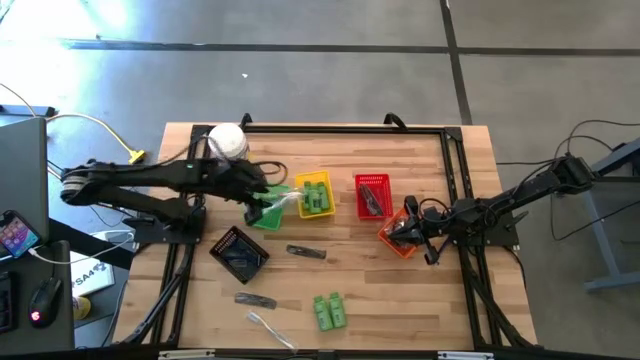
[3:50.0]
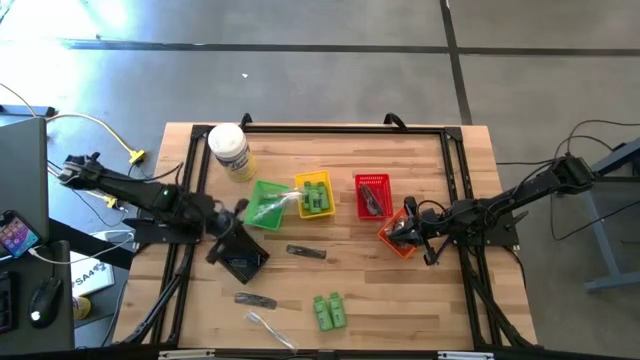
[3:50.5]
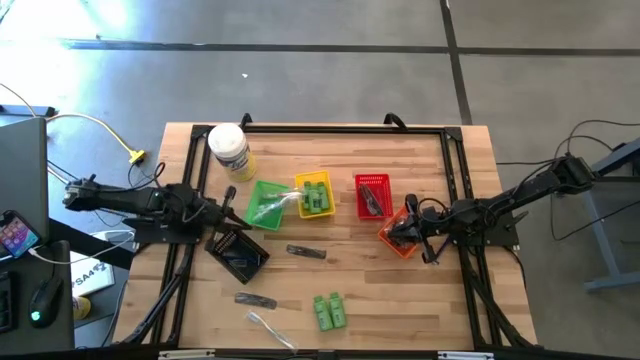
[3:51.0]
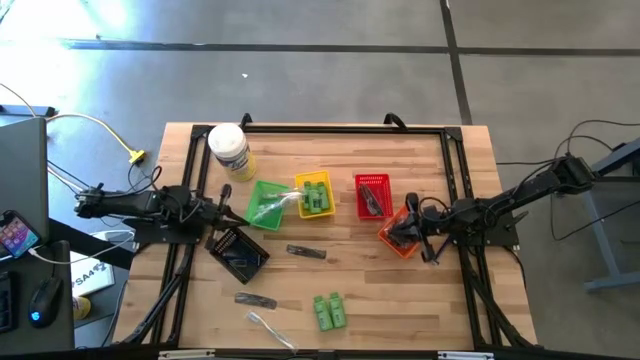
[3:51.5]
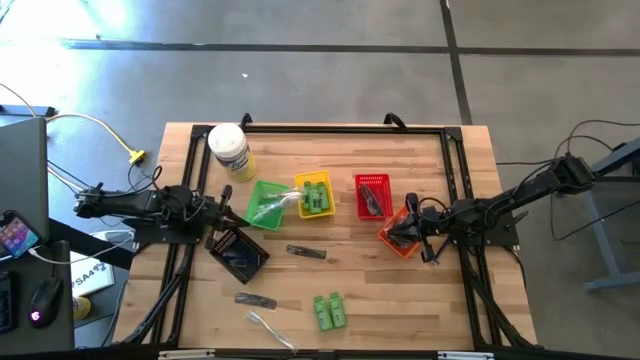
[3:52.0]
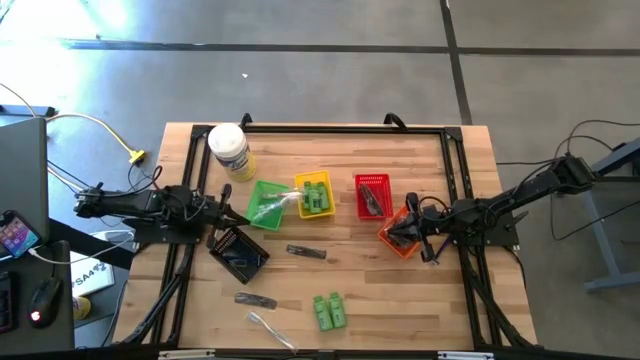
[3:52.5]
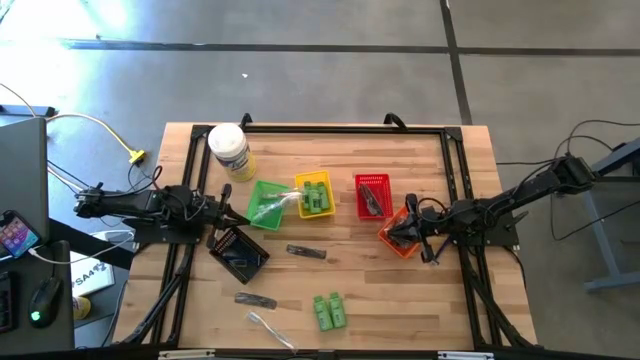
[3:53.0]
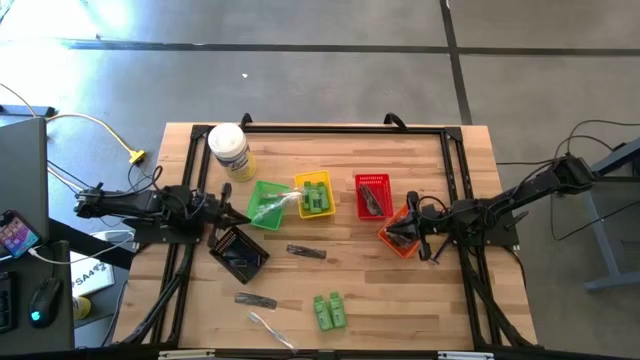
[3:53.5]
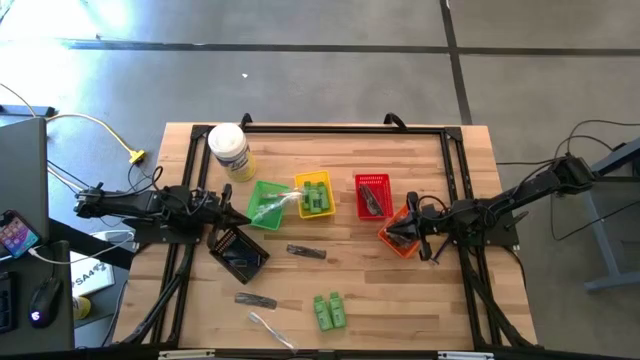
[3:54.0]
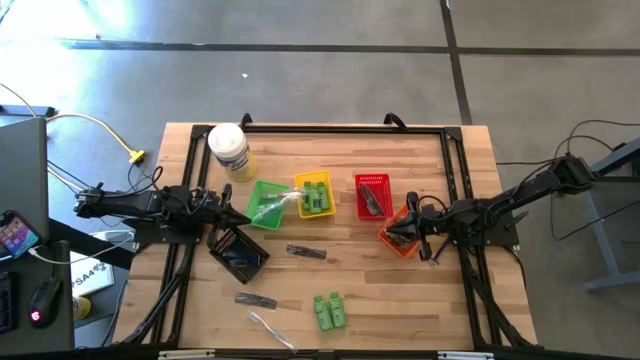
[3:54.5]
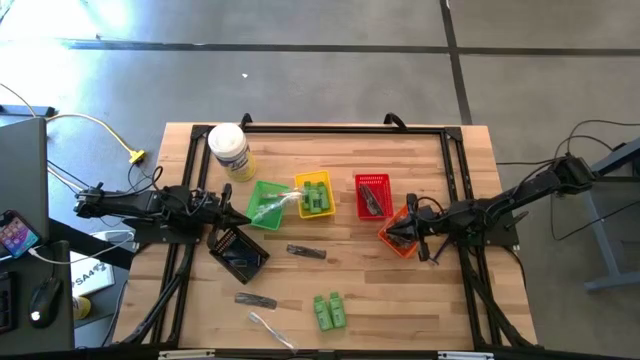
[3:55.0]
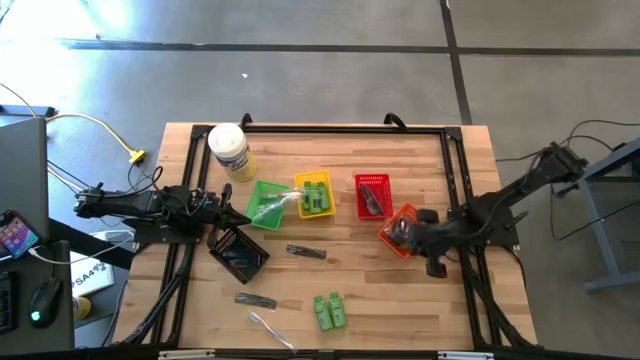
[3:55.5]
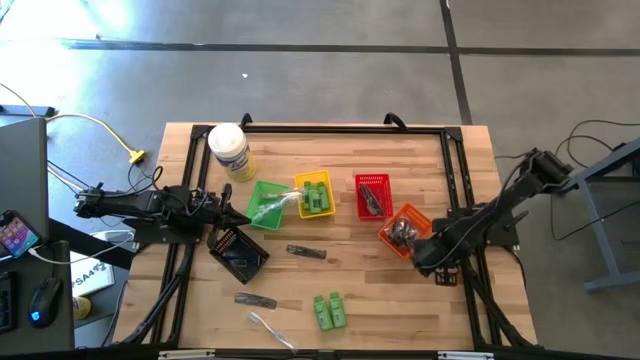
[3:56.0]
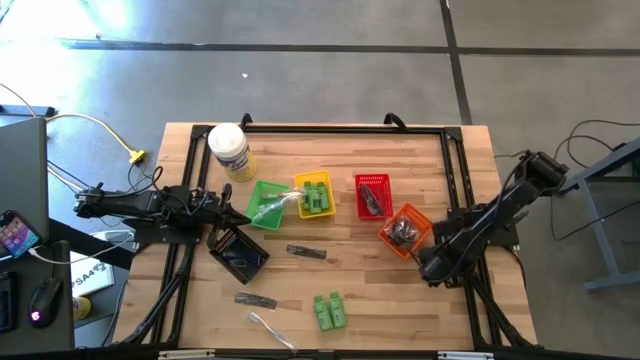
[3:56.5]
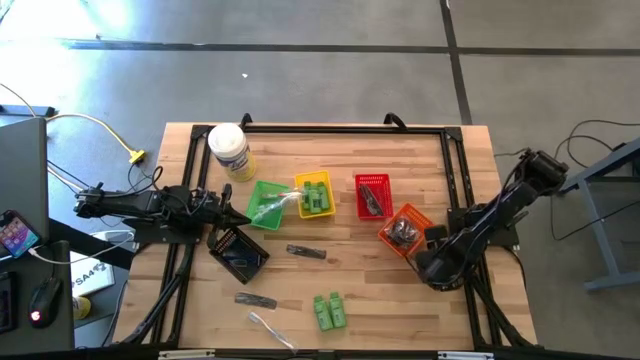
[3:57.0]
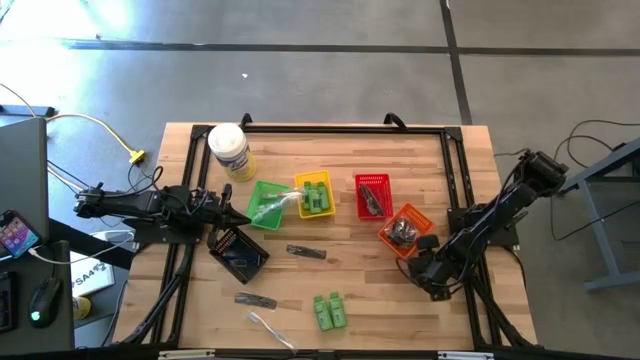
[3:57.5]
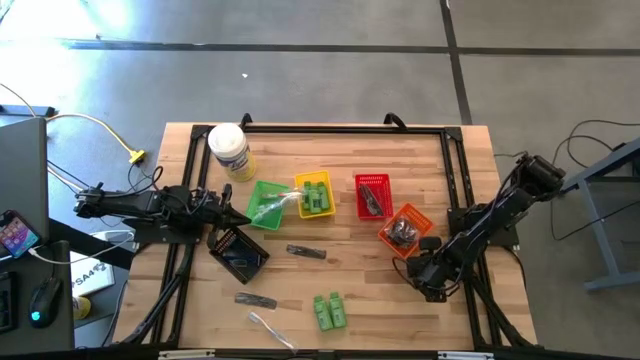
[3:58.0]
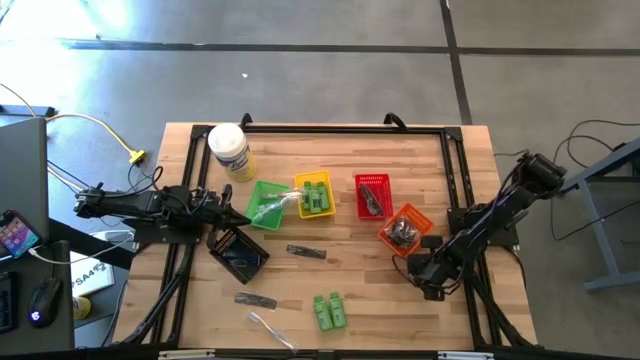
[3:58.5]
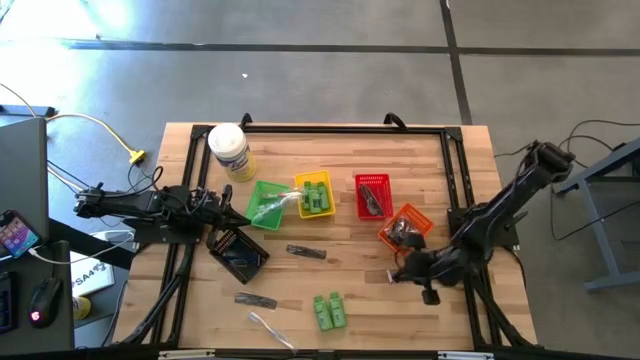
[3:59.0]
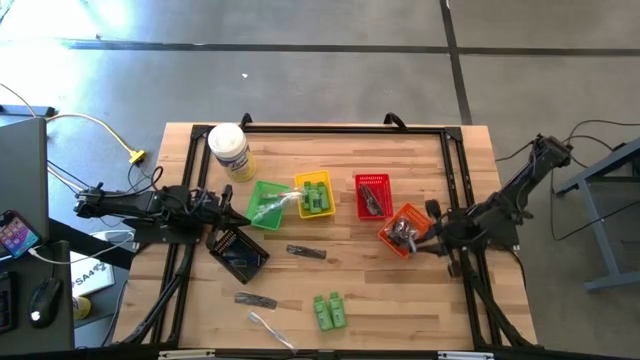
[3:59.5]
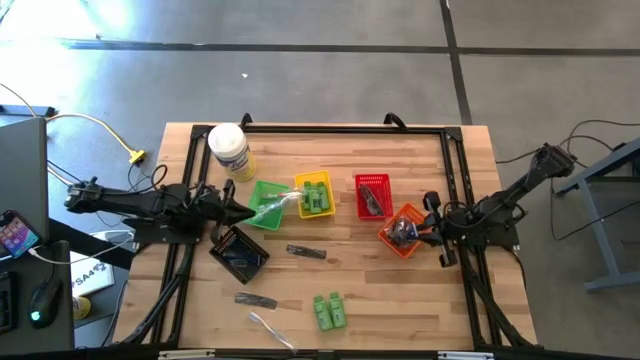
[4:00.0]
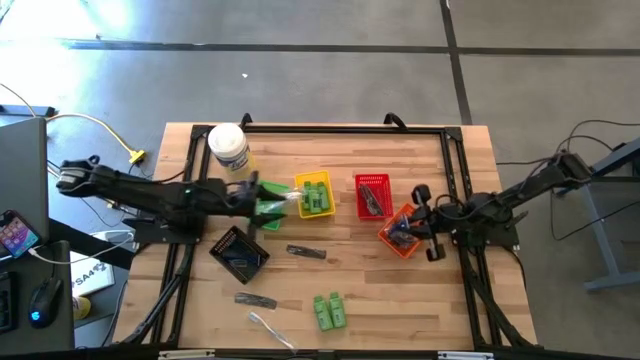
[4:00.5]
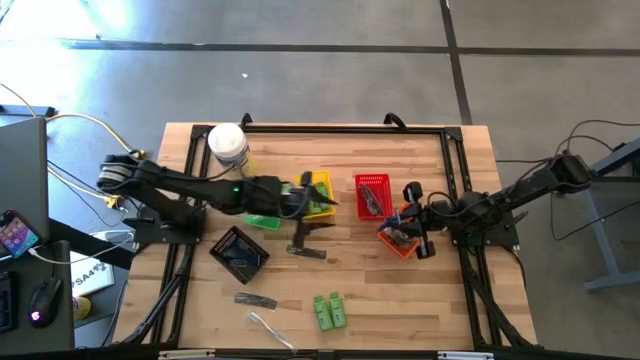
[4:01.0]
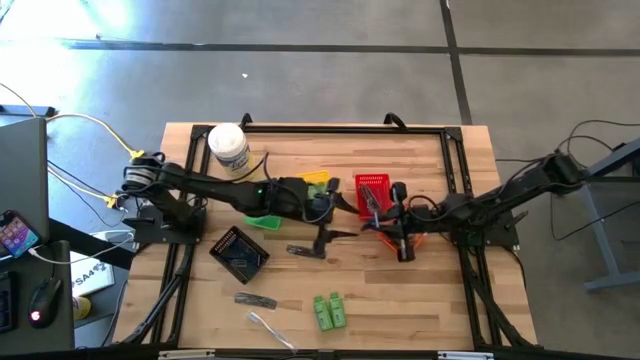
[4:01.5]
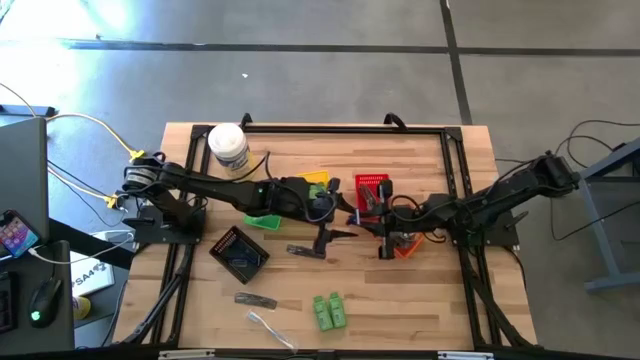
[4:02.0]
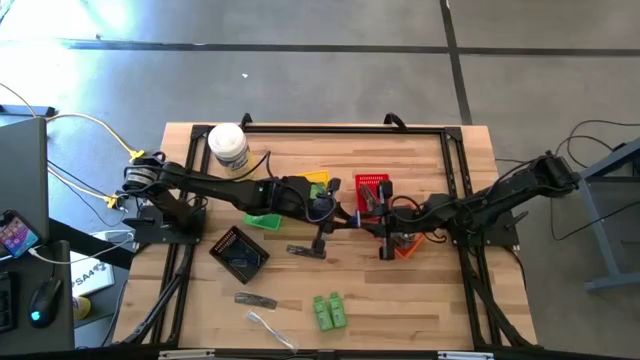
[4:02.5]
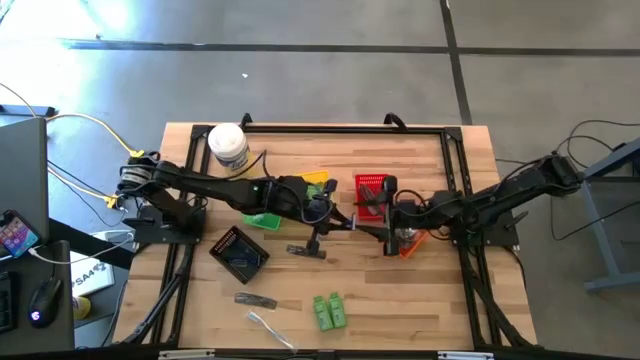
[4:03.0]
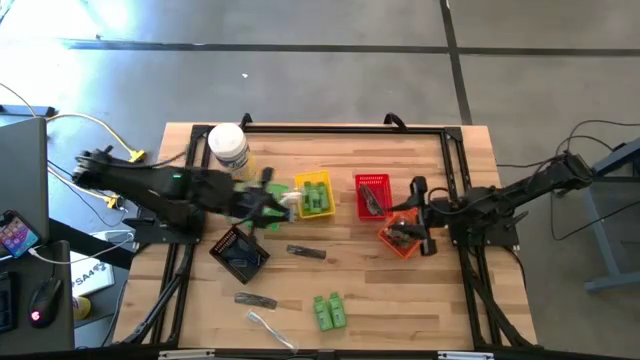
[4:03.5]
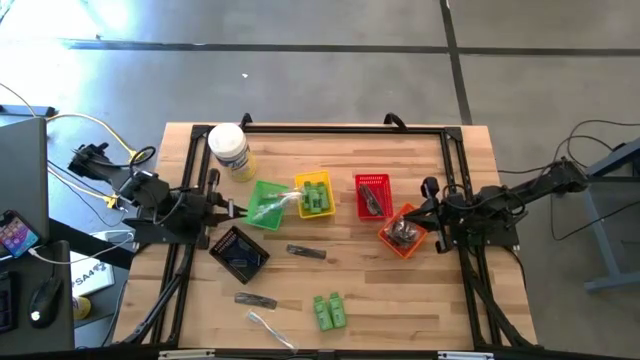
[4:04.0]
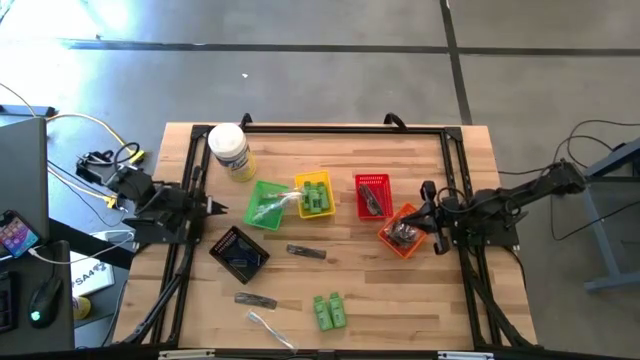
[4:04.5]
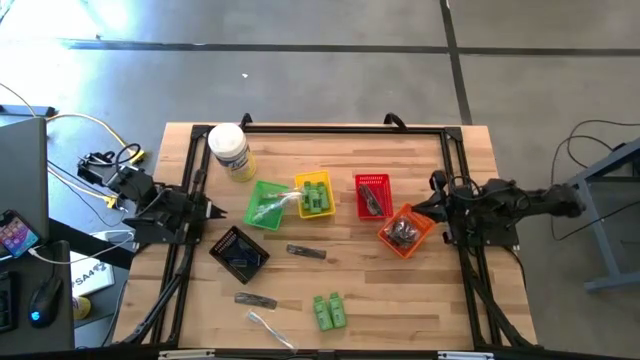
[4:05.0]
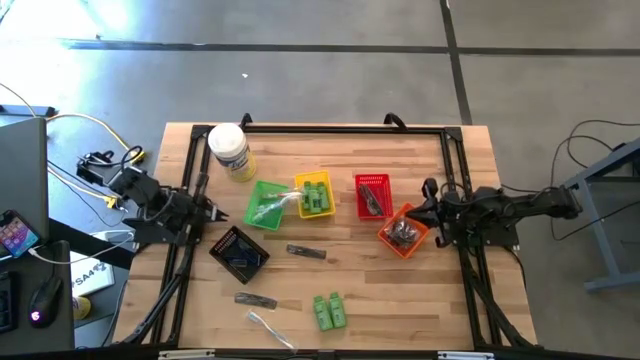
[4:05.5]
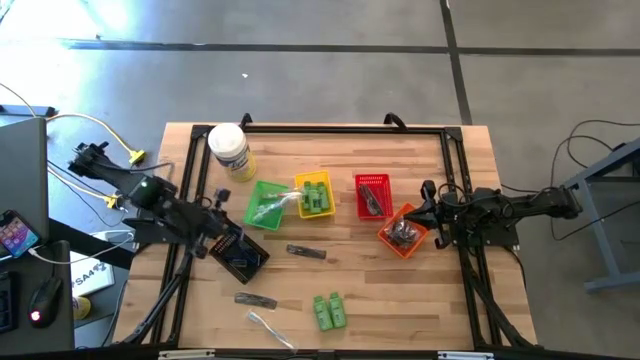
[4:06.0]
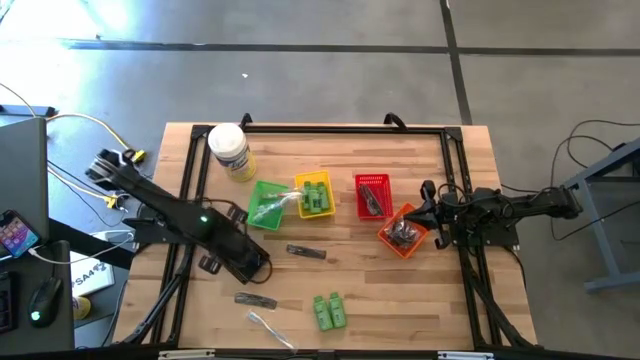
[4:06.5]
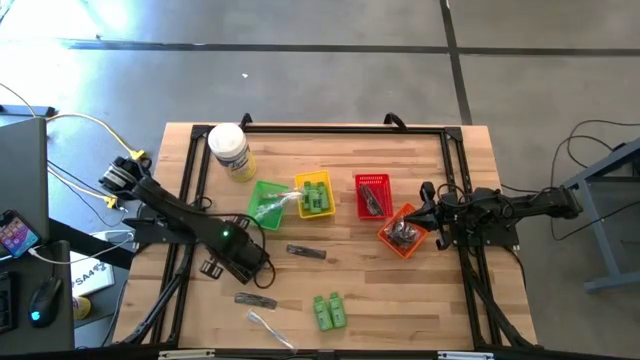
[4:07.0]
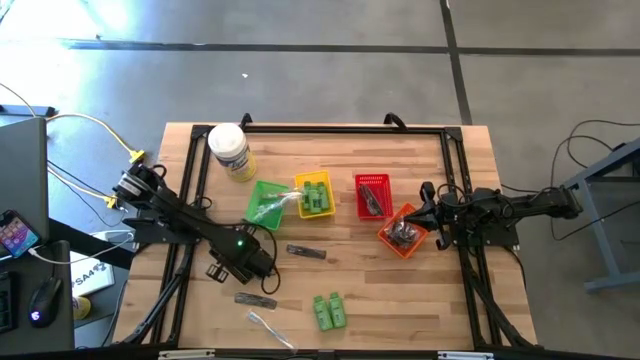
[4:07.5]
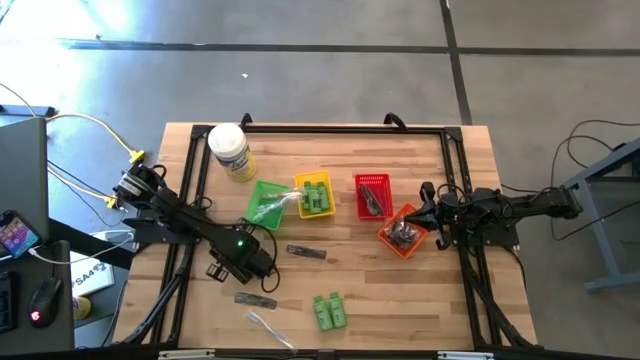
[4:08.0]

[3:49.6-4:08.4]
Task: Pick & Place Travel size toiletries
Put the blue razor into the black basket

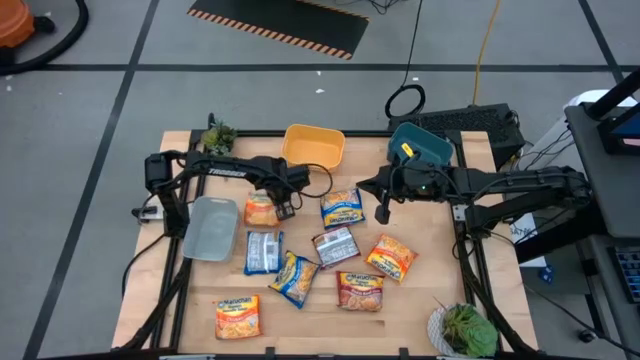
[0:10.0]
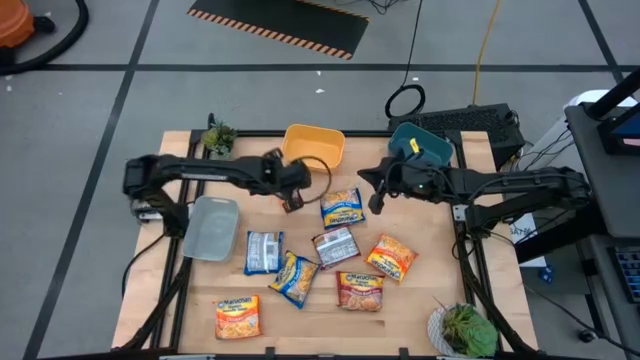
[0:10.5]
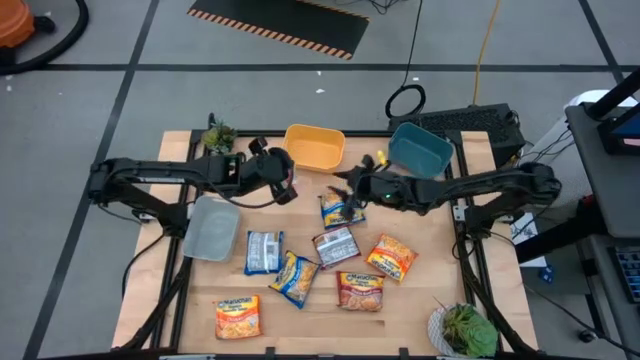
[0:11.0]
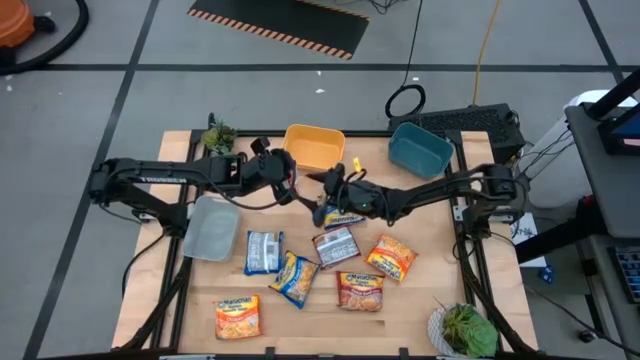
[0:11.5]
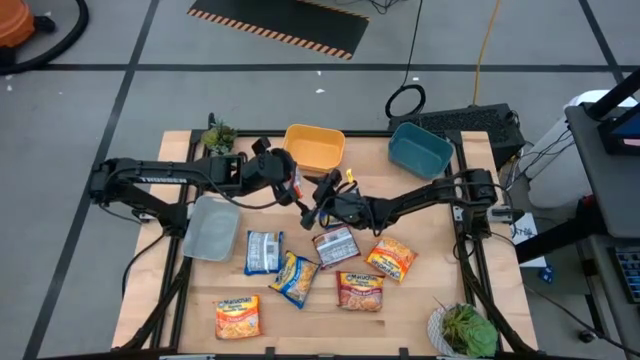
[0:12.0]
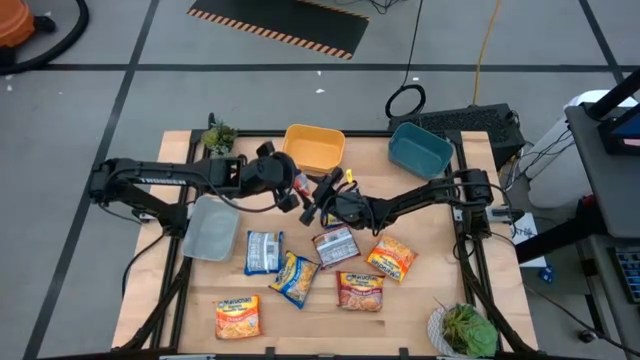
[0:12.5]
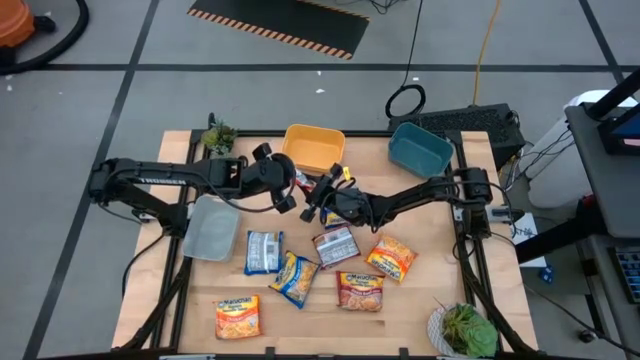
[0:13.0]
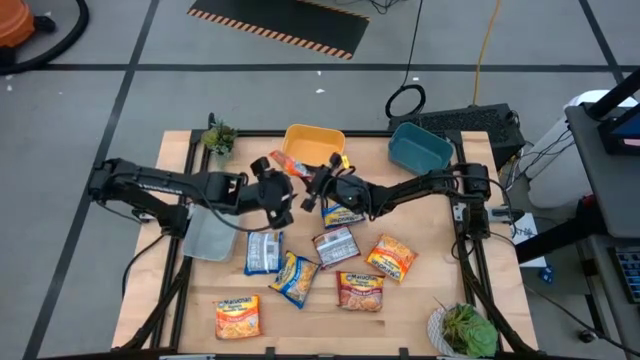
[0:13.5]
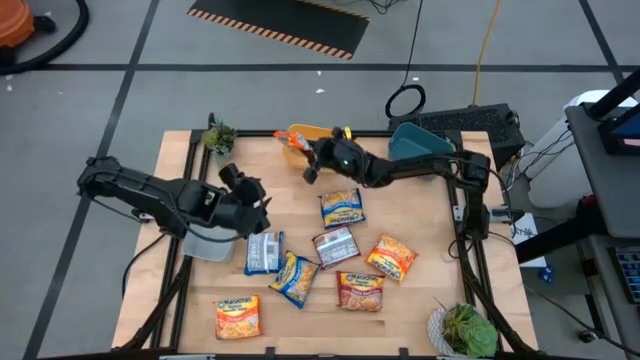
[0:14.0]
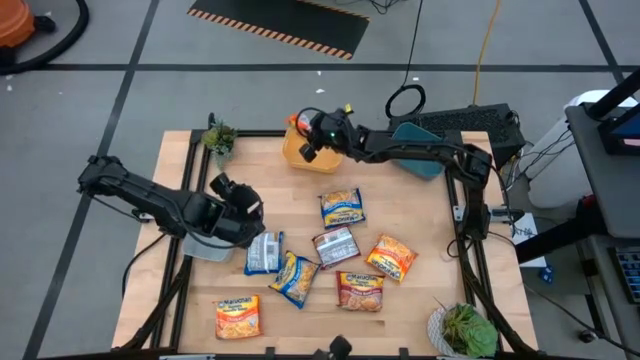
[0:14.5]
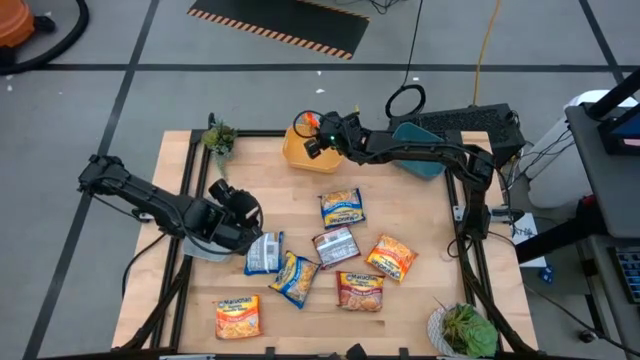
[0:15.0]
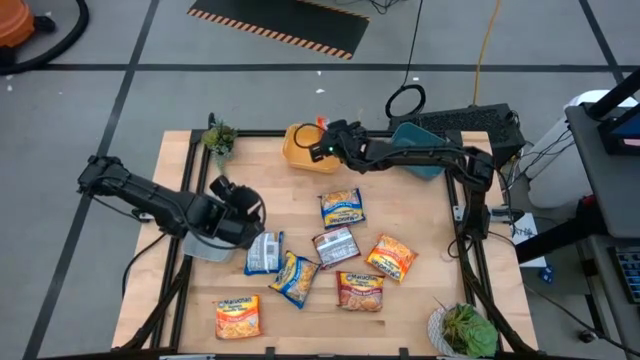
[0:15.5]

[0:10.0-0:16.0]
Task: Sort Maruchan noodles
Put the top left orange bag into the yellow bin
